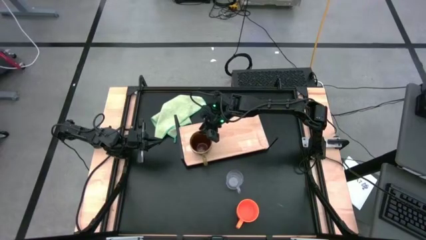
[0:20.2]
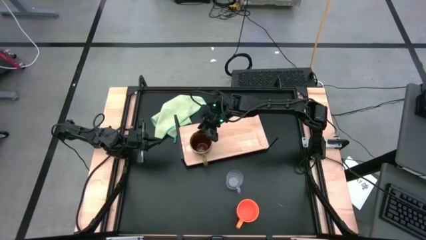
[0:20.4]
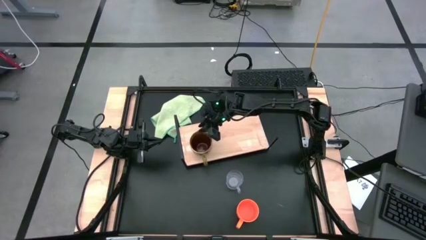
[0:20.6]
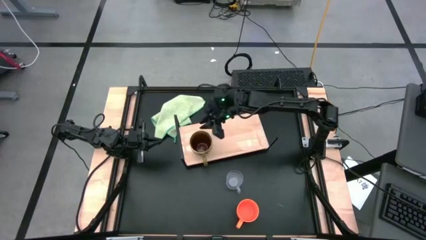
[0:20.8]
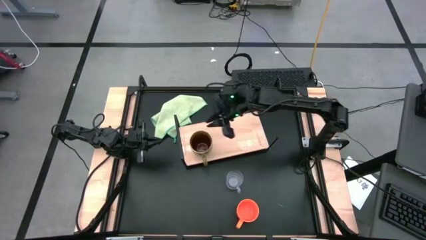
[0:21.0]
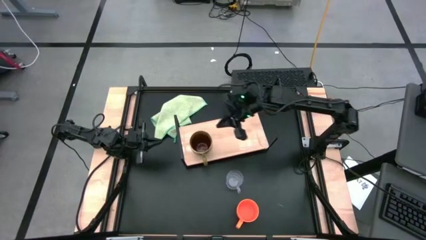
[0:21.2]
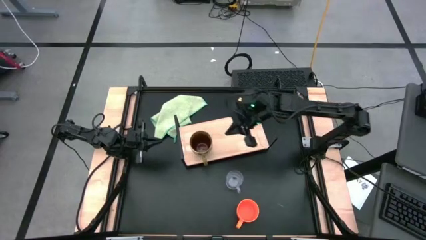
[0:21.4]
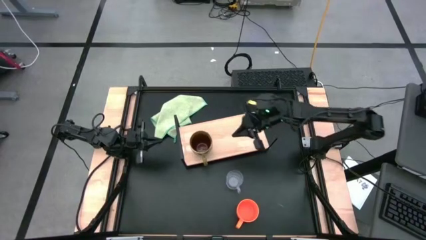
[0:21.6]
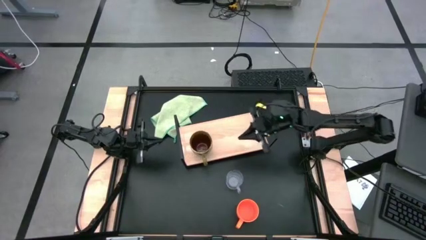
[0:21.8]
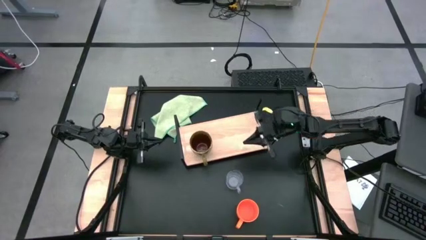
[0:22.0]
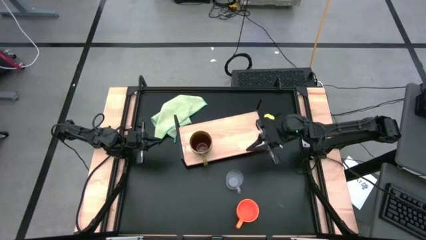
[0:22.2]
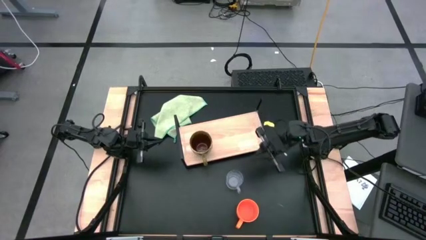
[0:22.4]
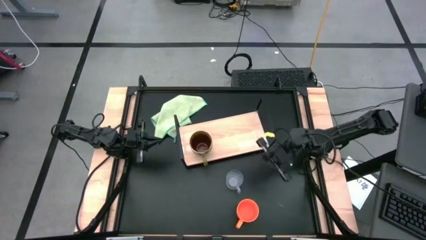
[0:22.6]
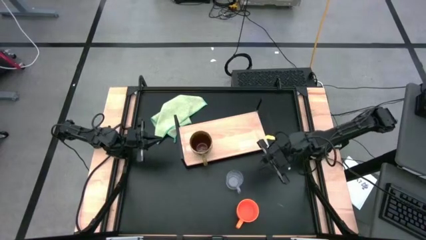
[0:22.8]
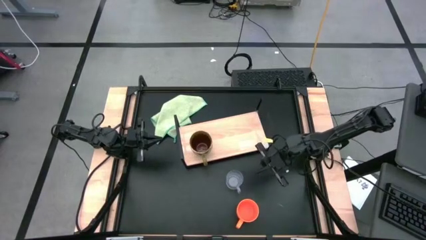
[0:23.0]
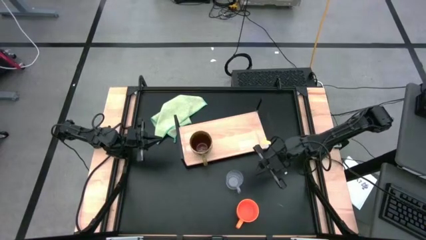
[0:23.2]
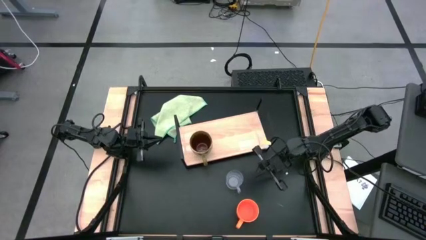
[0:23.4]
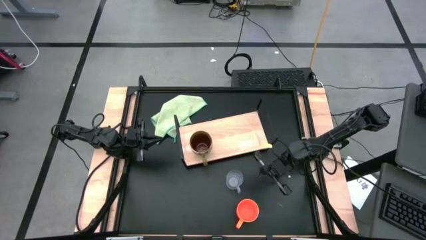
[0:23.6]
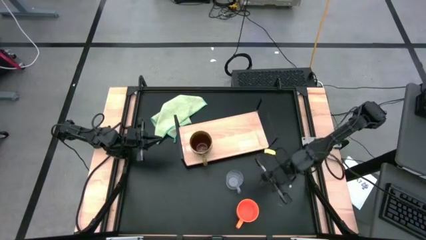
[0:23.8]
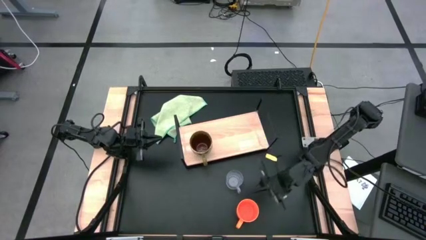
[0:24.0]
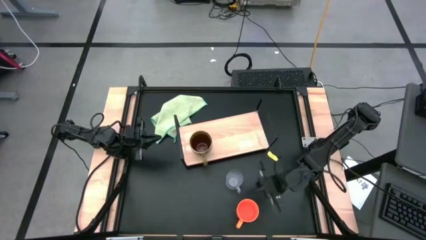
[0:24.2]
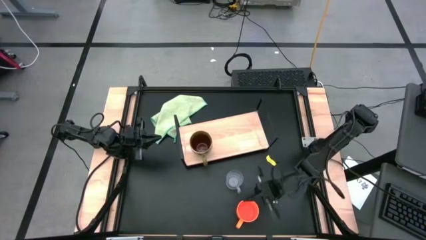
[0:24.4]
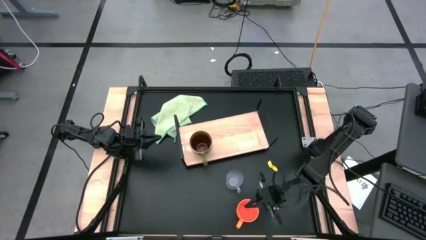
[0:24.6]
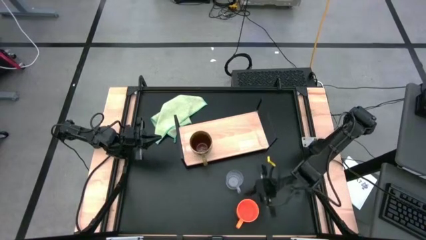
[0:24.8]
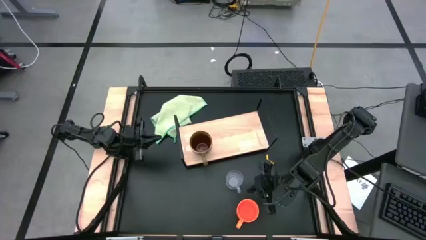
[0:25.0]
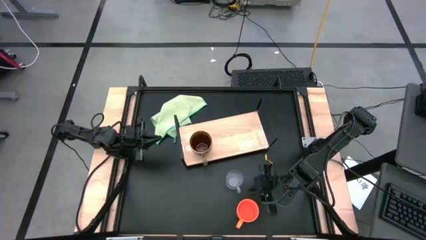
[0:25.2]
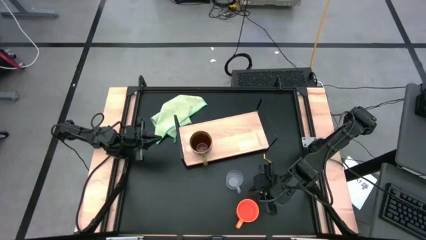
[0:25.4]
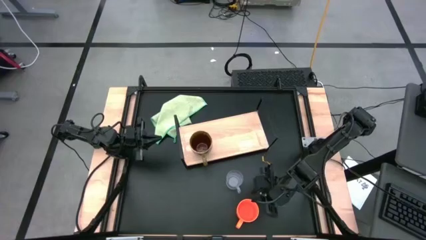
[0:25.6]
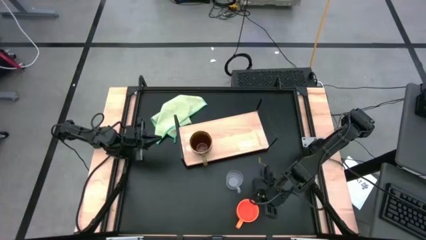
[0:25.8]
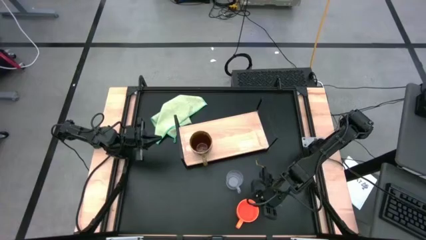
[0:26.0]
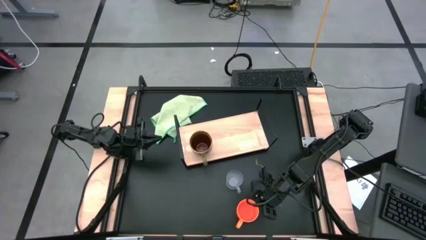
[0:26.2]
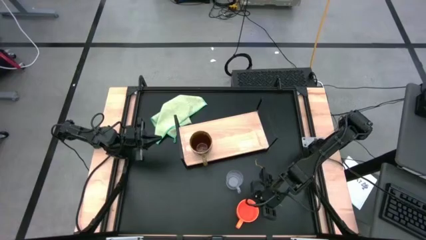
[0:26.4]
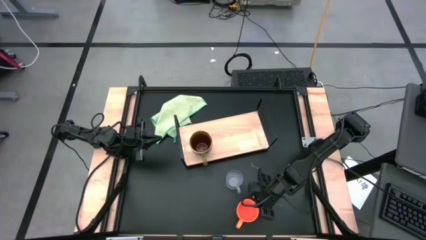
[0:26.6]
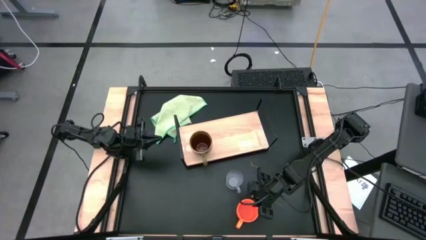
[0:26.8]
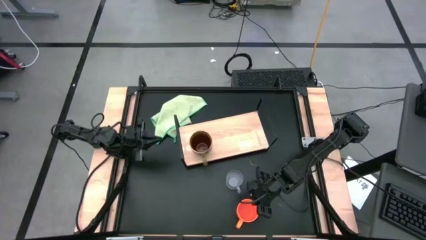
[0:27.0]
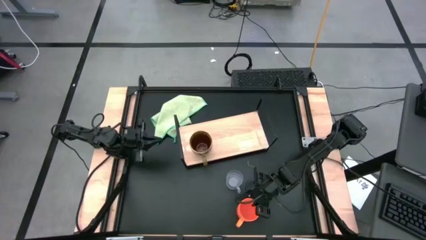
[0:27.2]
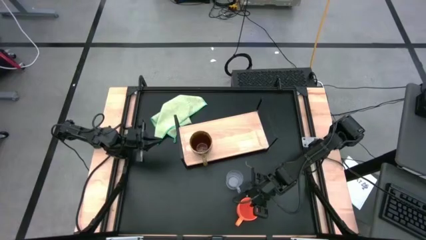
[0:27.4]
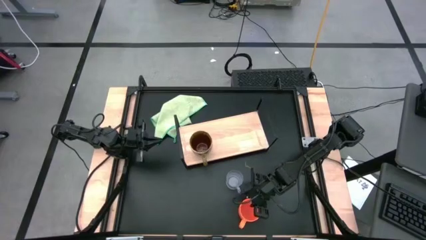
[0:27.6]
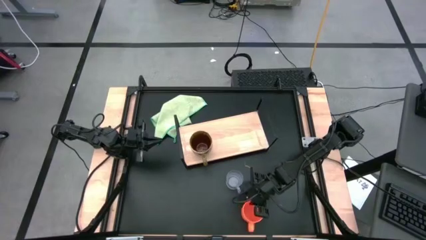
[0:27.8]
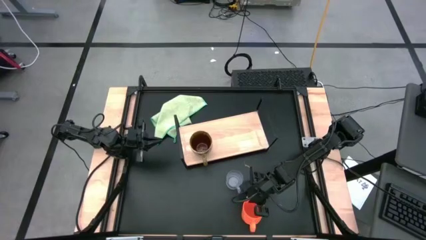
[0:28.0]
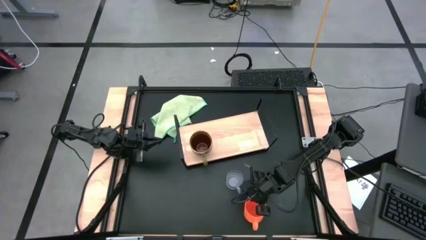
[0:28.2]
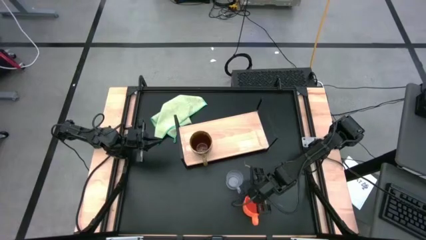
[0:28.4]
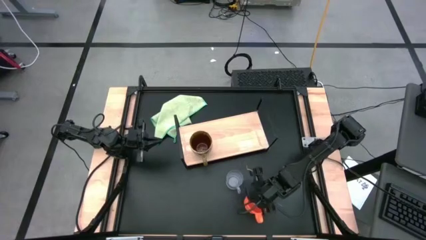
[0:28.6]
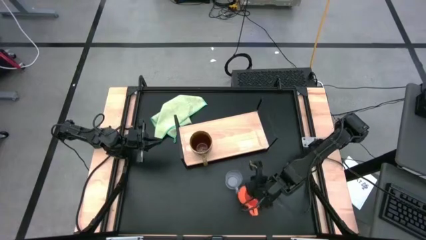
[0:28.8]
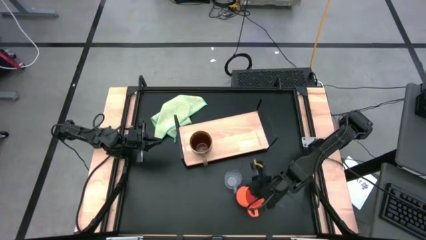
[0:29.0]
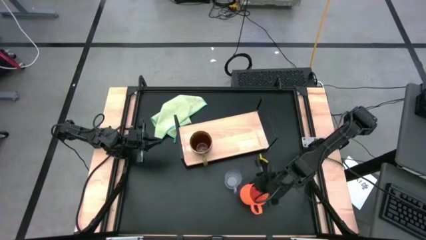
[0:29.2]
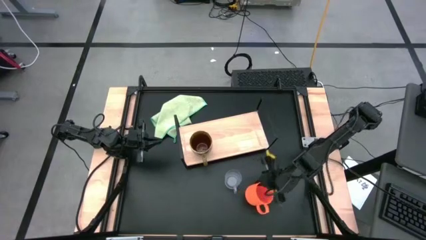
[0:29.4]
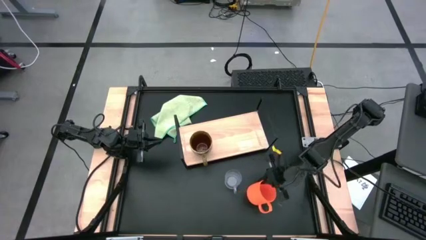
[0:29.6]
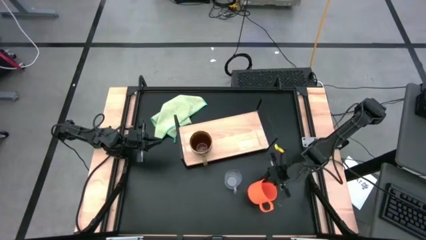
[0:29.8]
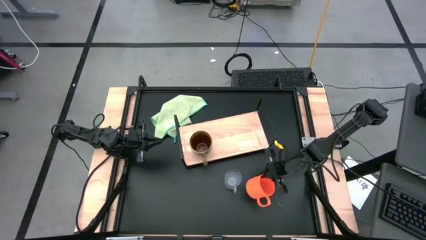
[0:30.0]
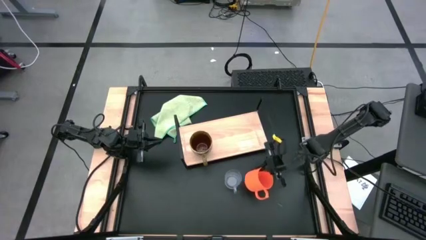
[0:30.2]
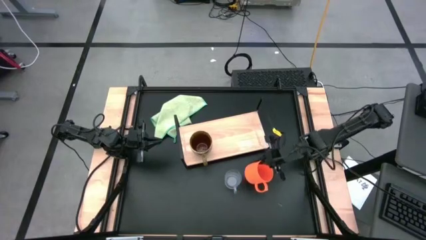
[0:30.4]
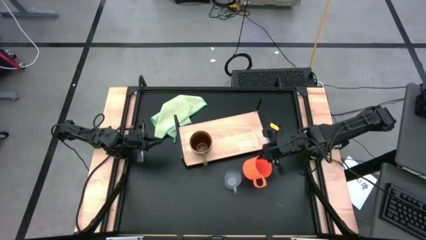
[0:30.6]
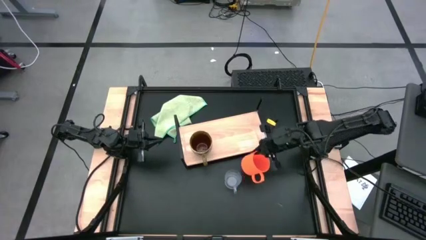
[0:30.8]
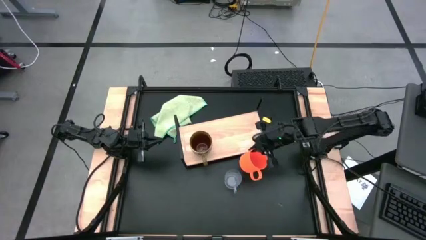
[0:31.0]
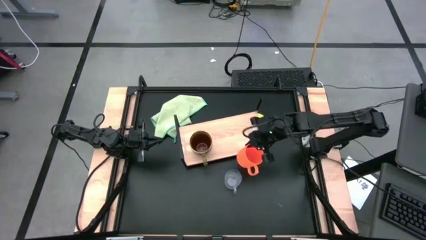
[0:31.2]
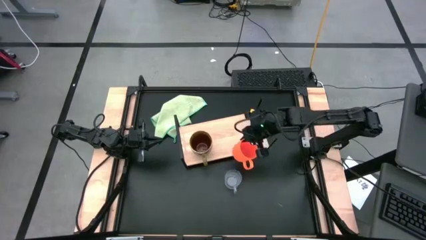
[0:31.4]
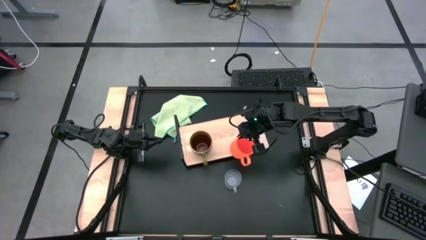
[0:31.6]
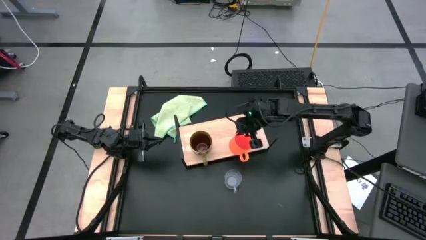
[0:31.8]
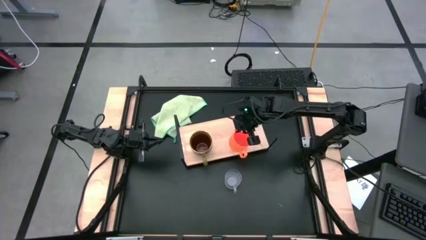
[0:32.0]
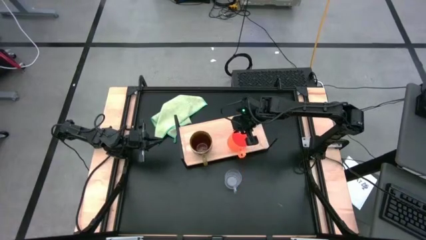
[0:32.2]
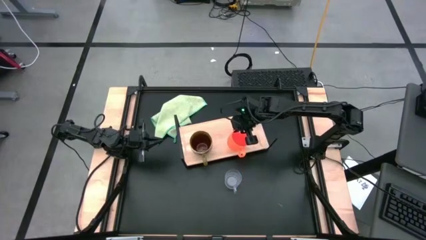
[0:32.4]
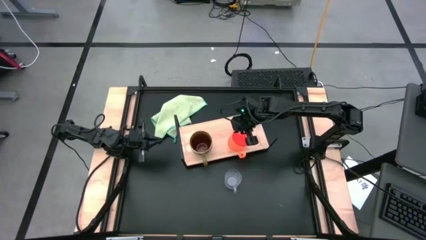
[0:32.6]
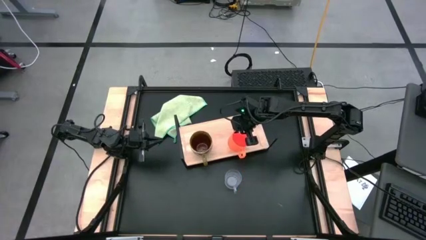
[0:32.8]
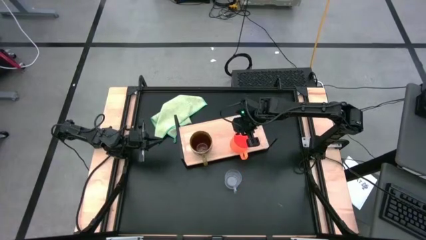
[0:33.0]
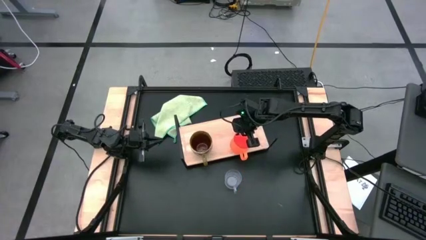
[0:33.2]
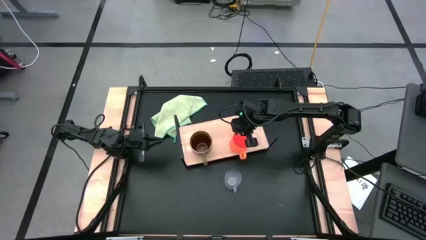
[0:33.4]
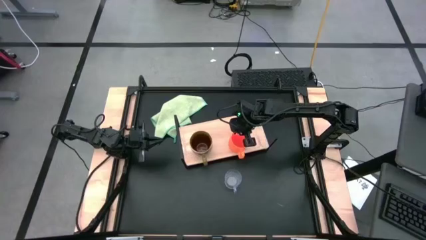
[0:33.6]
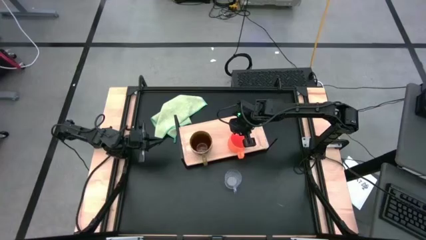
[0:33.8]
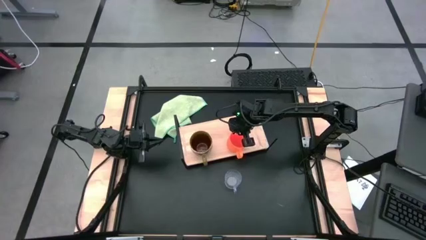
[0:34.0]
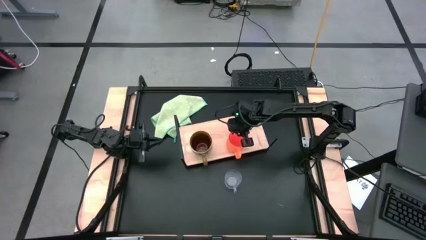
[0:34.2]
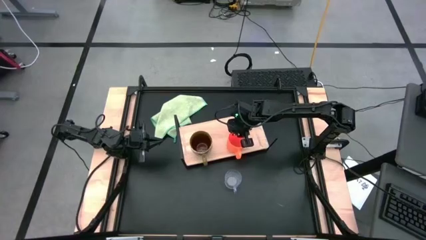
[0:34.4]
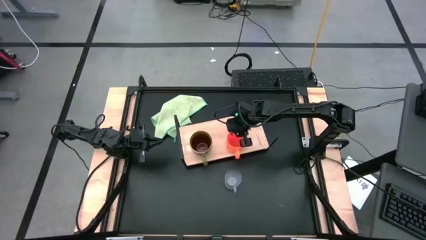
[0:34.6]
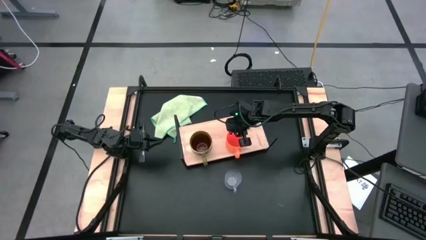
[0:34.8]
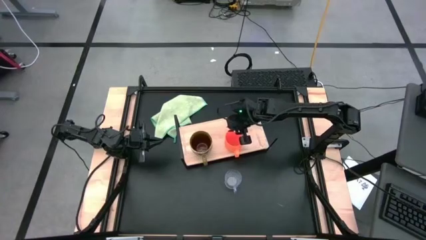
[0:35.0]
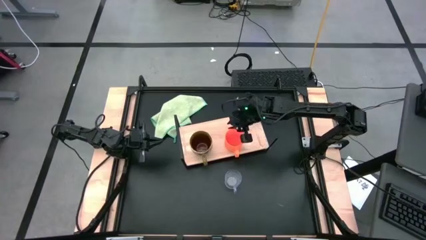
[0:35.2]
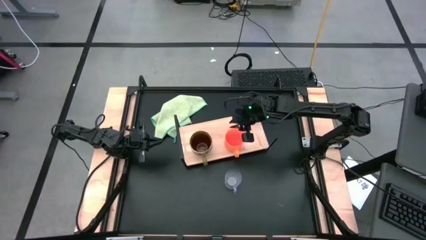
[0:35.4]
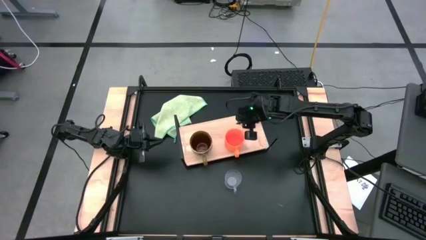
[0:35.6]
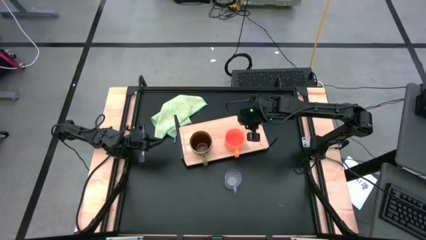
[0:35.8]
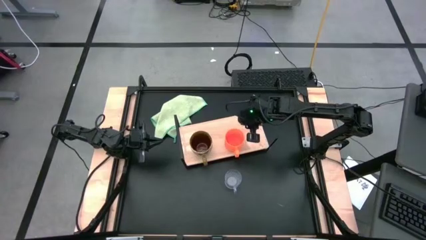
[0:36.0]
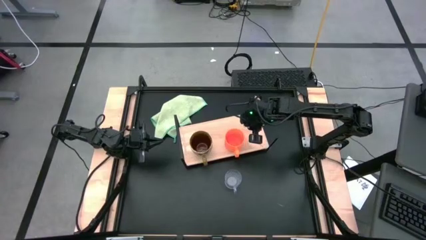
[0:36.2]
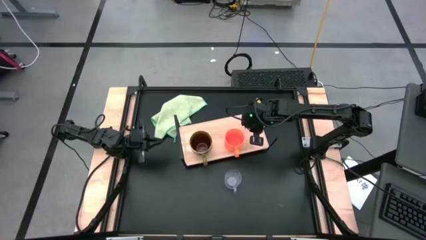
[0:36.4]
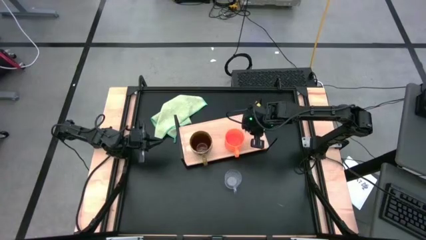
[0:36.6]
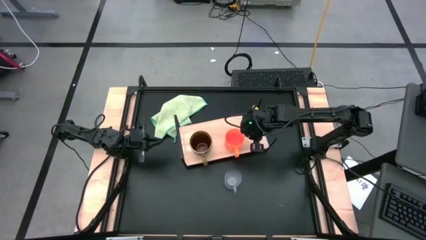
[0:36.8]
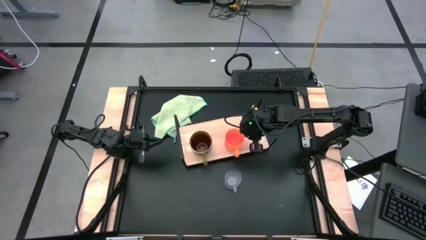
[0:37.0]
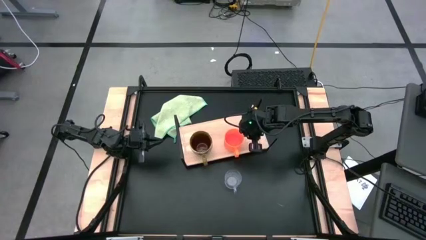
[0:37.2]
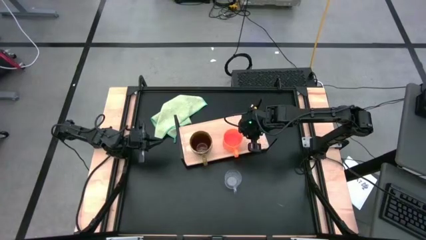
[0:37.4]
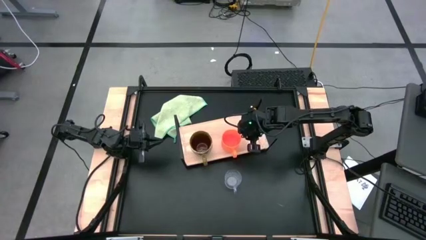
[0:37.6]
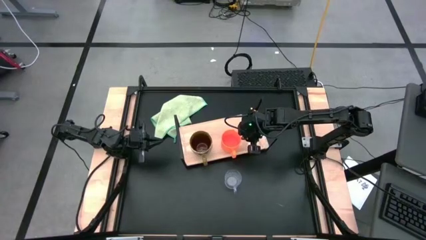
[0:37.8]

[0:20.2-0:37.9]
Task: Stack small to large cups/mugs on shelf
Put the orange mug on the shelf
